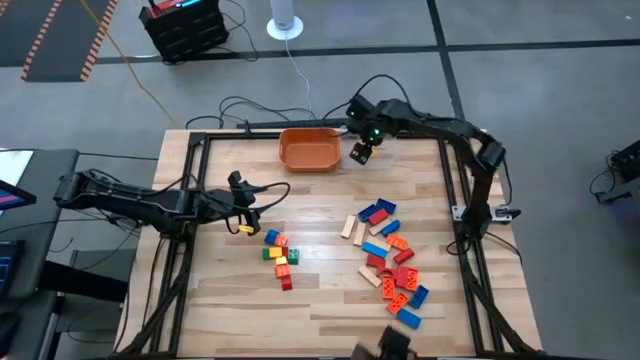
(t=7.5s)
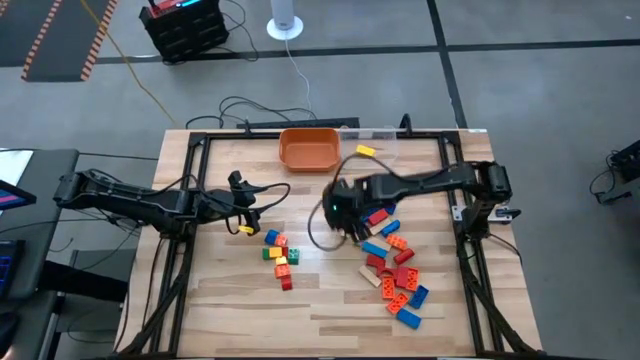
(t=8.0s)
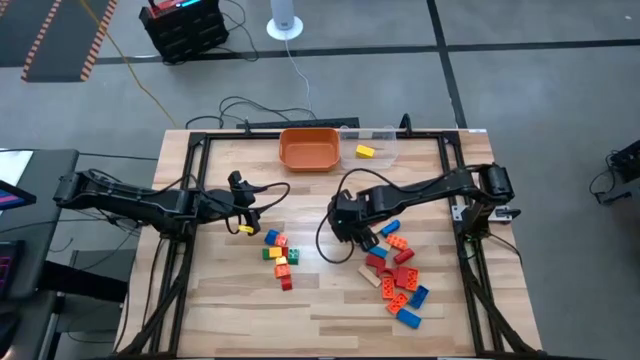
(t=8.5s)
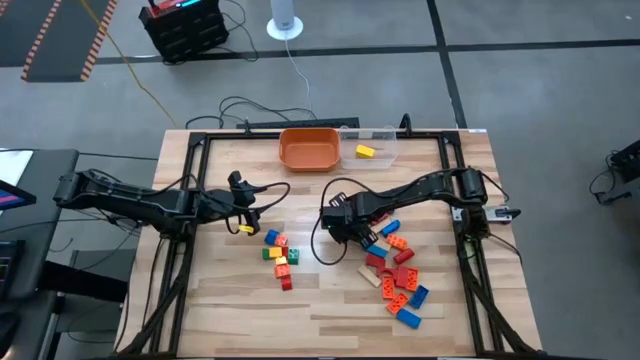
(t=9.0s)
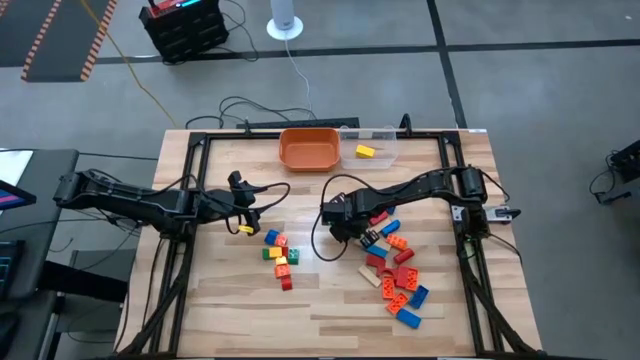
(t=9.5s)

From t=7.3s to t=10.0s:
Task: Sort blocks by size
Put the center wooden block into the transparent bin

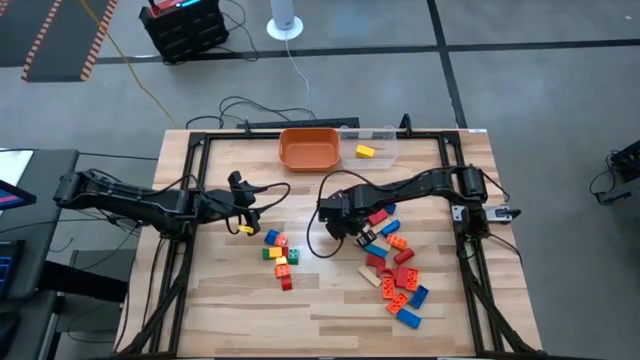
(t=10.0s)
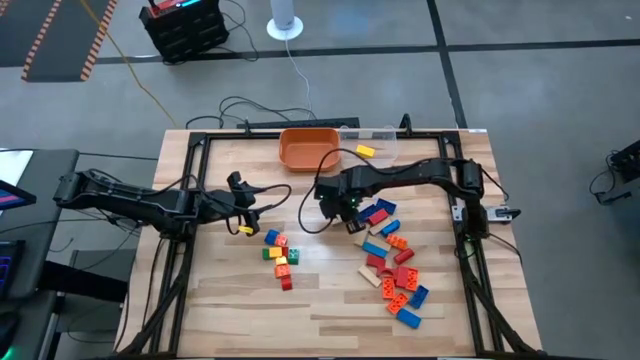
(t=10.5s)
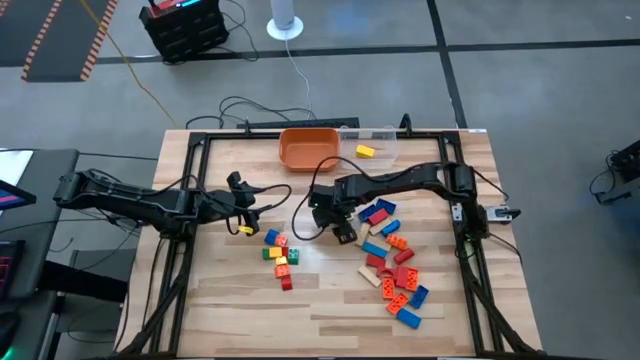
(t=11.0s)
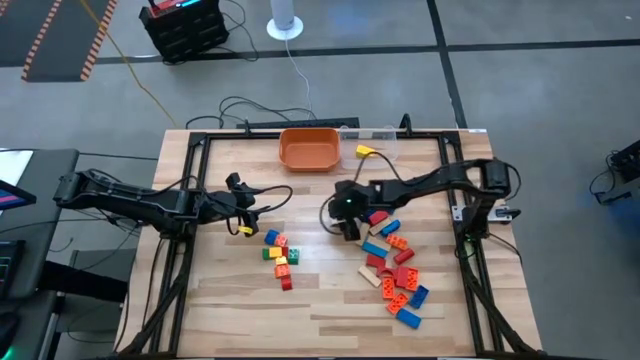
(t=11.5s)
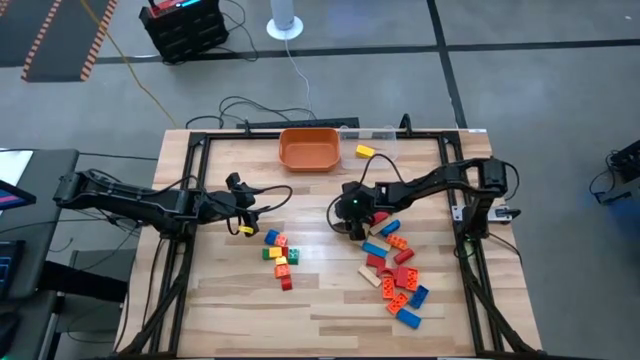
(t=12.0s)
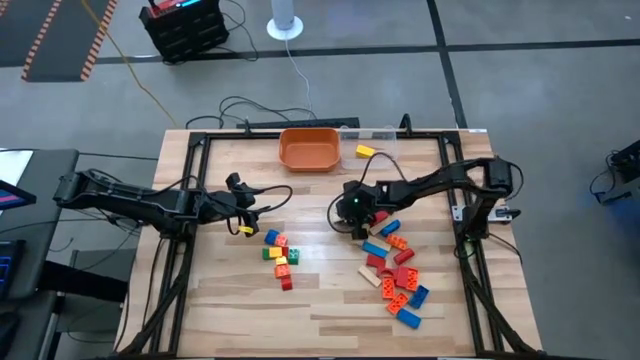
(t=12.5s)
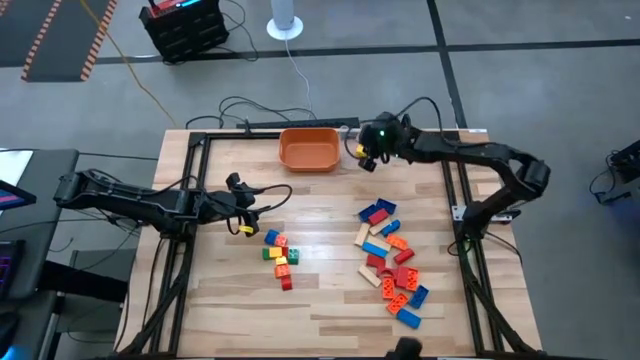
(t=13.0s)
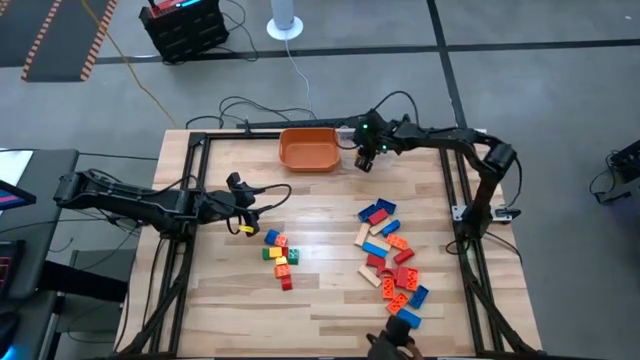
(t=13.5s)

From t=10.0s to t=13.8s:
Put the center wooden block into the transparent bin

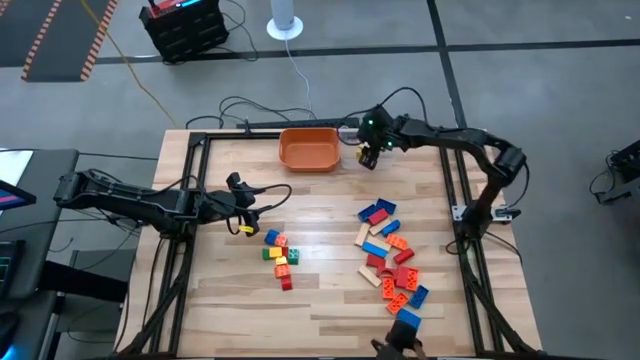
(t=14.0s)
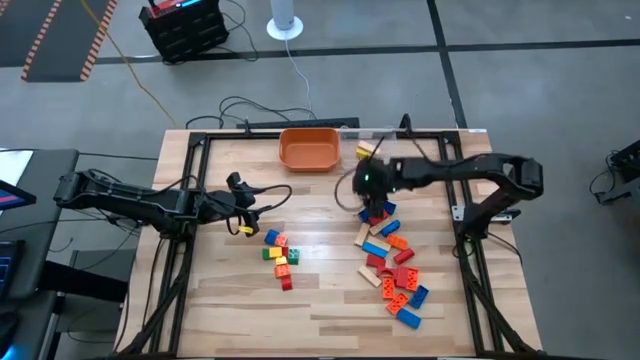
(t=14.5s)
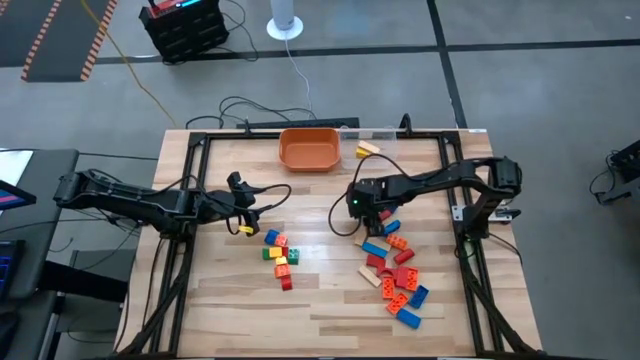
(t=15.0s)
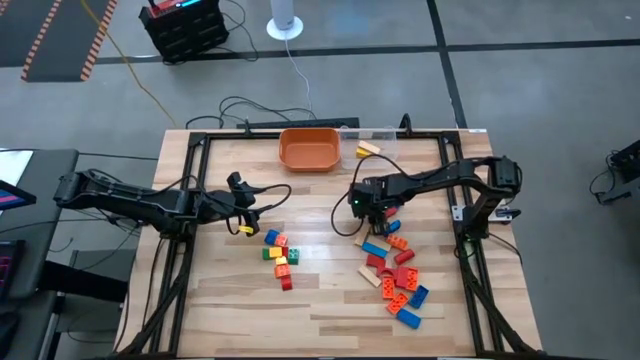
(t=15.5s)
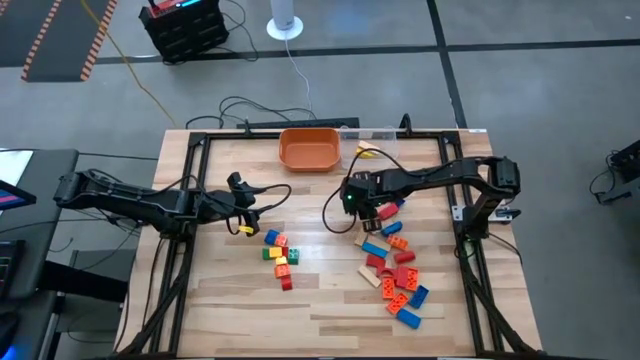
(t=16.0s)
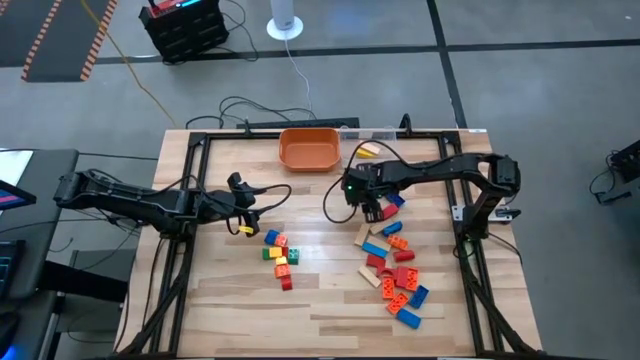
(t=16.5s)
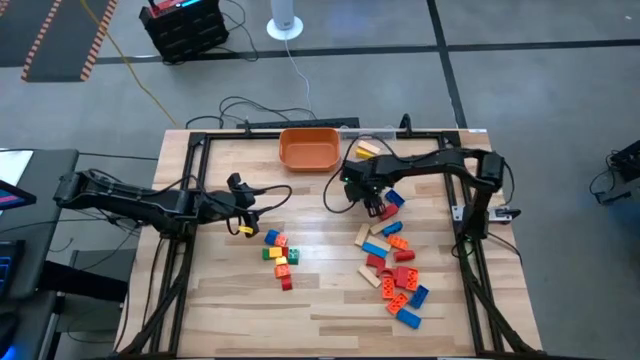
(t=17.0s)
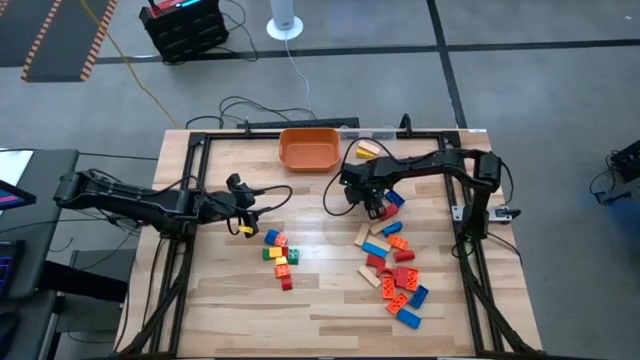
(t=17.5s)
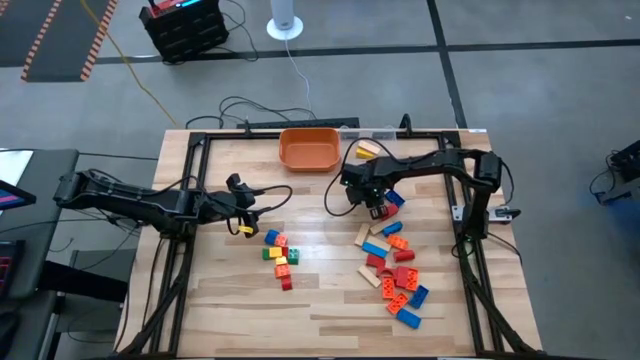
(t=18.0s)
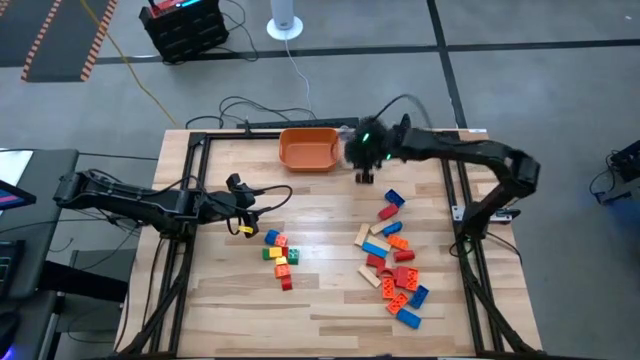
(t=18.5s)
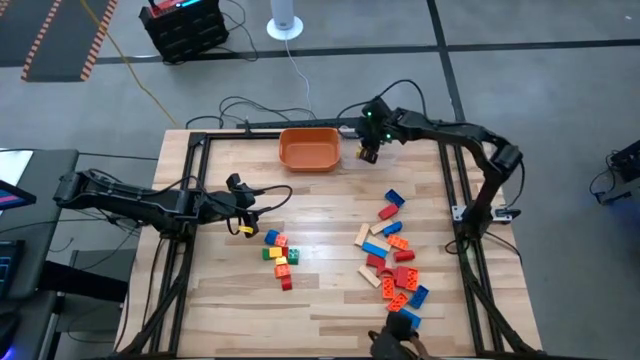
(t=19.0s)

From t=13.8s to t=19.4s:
Put the middle right blue game piece into the transparent bin

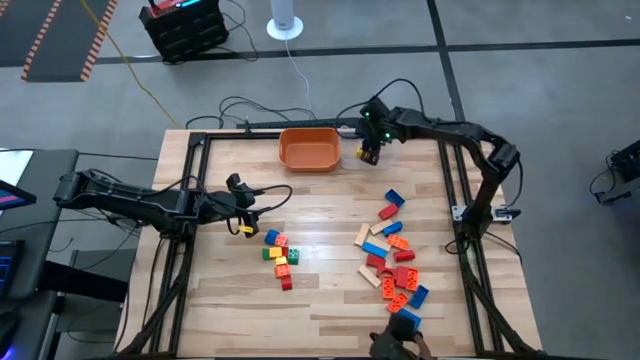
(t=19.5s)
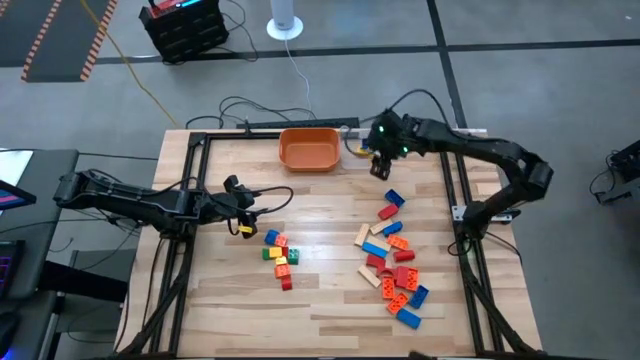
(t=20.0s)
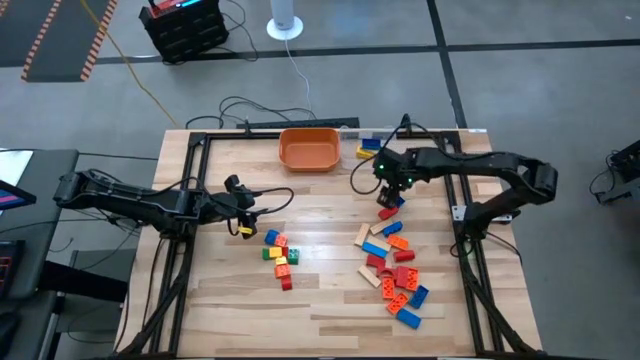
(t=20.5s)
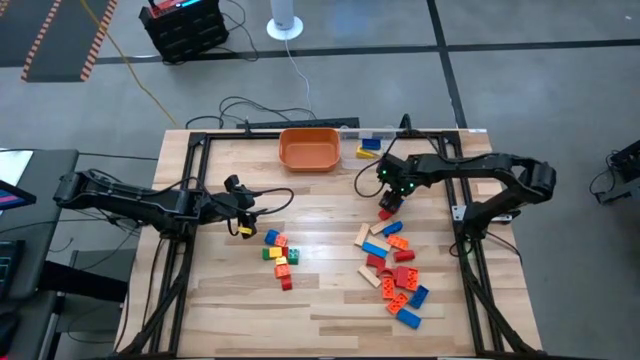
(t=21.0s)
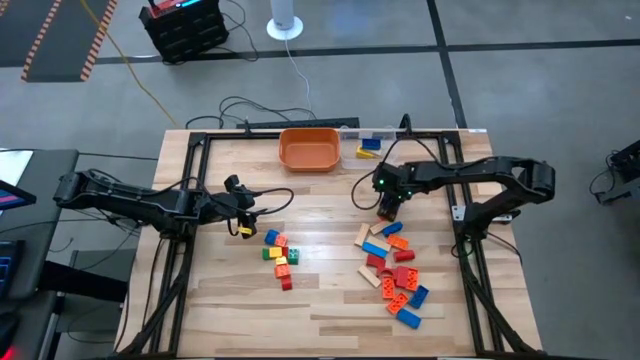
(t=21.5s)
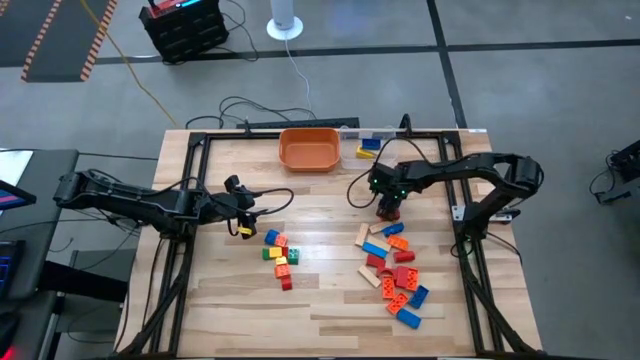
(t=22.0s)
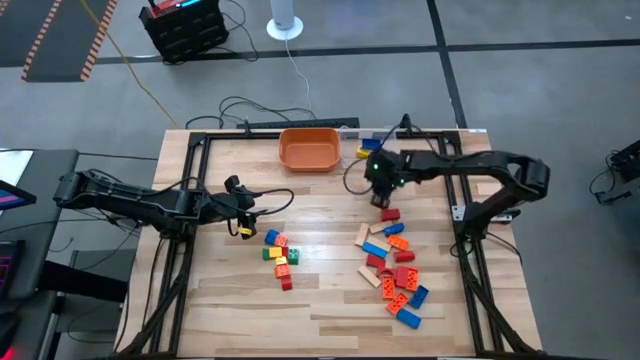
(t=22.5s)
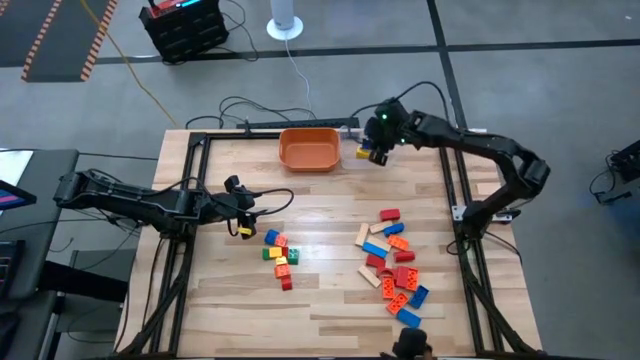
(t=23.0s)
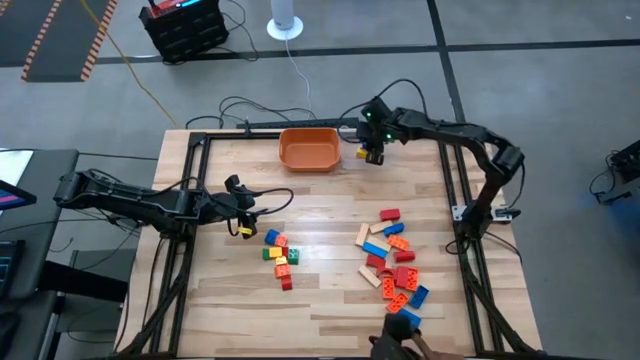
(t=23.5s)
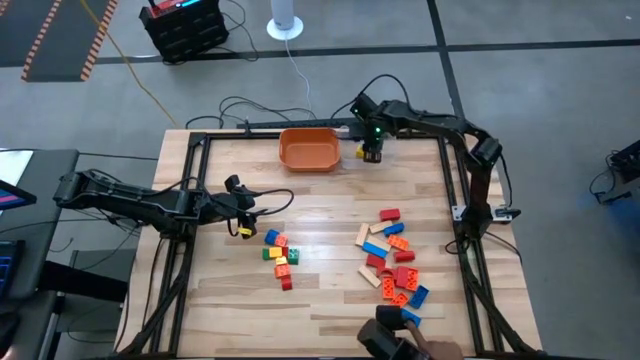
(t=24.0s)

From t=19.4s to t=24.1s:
Put the top right blue game piece into the transparent bin

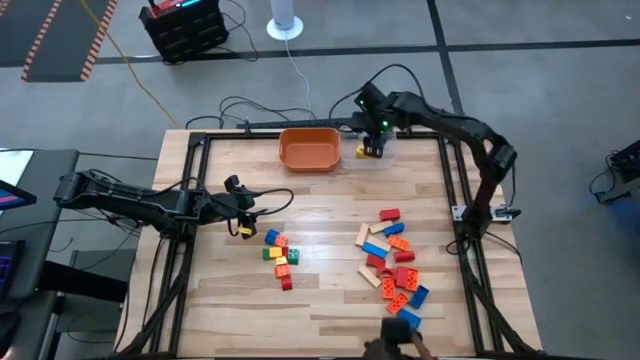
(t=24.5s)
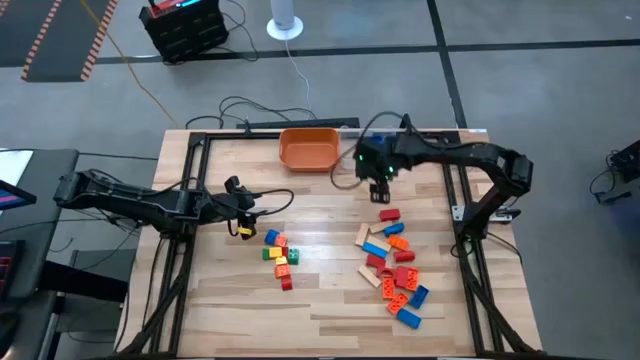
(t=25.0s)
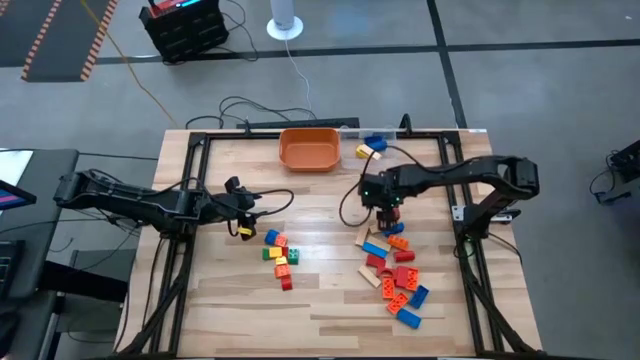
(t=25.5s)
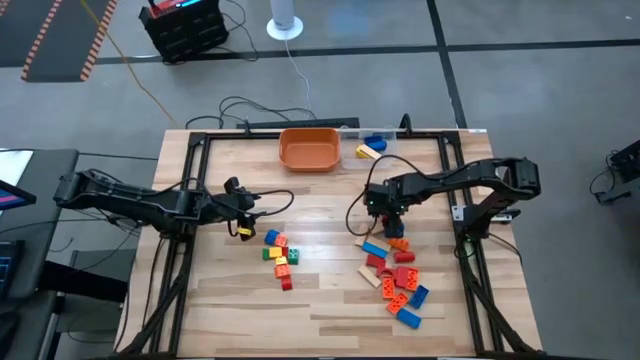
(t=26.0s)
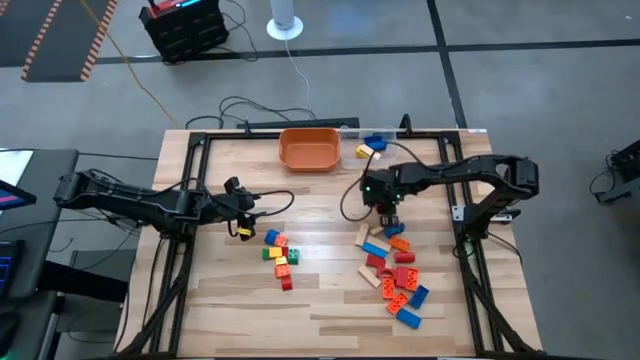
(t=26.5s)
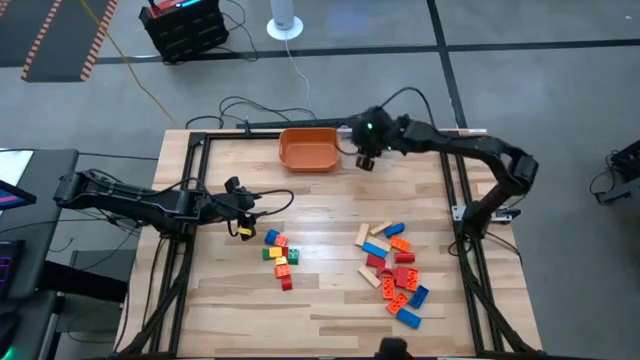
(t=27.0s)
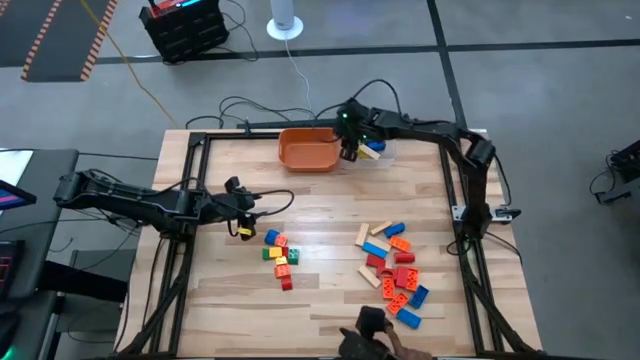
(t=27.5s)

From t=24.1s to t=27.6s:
Put the middle right red block into the transparent bin

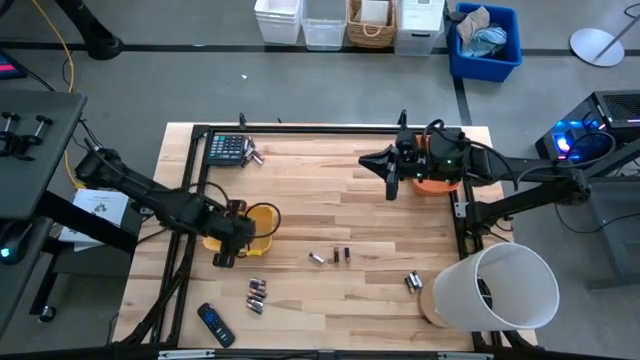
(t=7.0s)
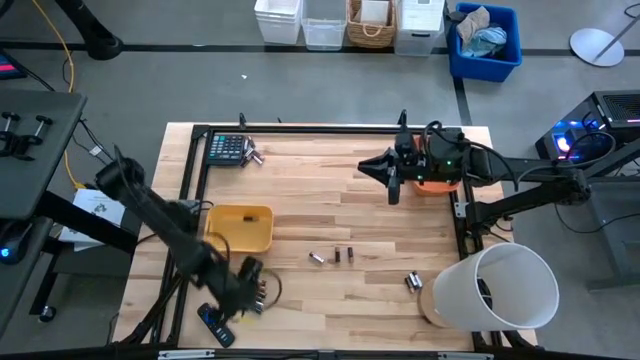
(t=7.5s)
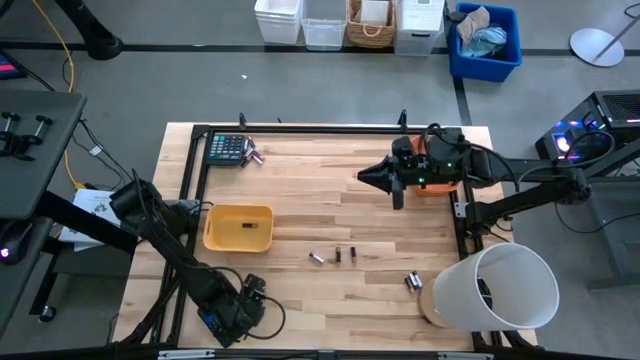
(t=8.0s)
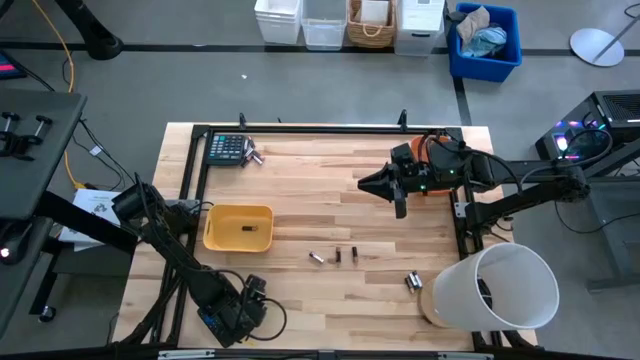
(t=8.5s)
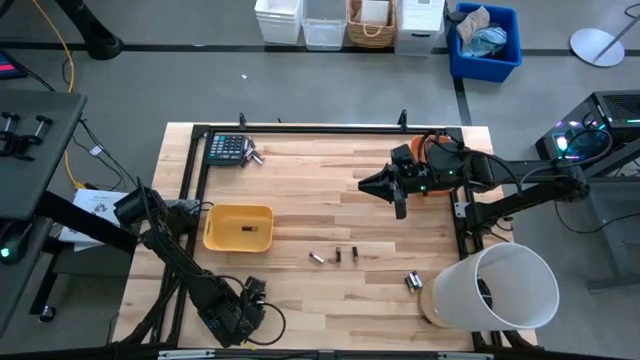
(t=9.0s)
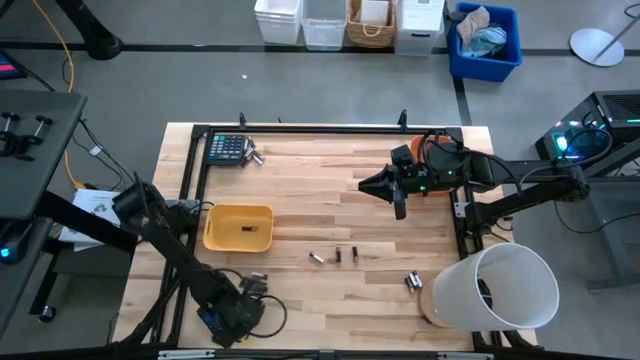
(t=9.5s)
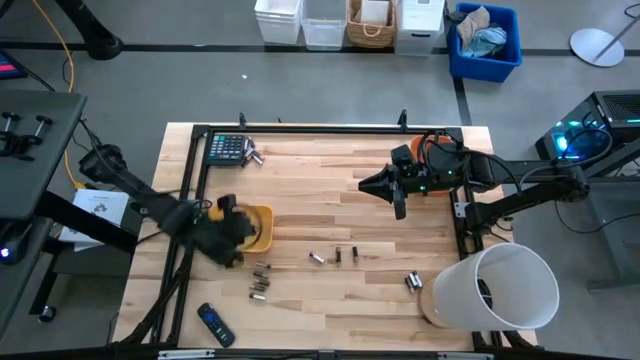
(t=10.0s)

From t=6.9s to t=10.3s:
Task: Sort batteries
Put the black battery into the yellow bin
